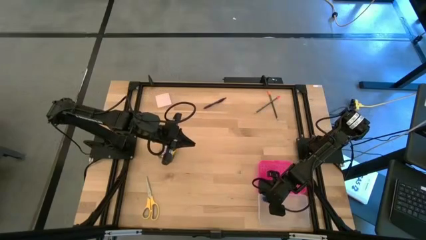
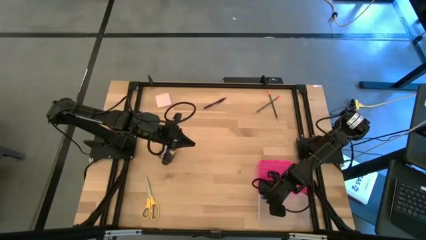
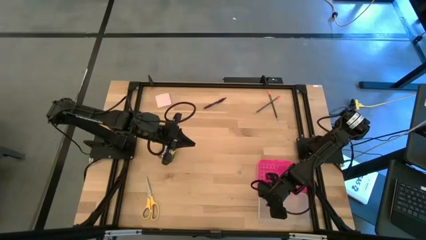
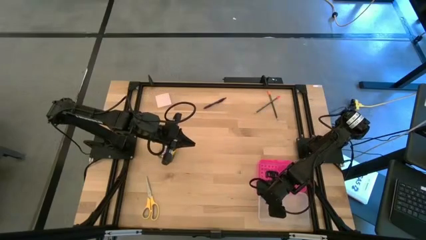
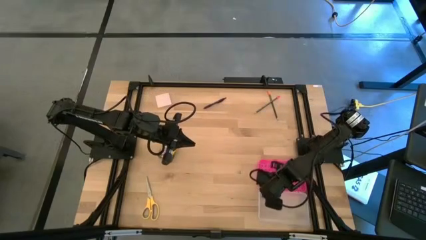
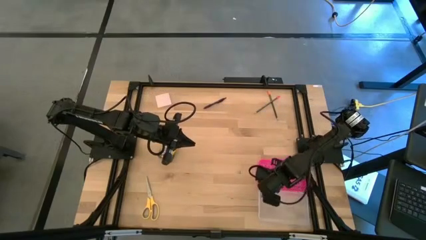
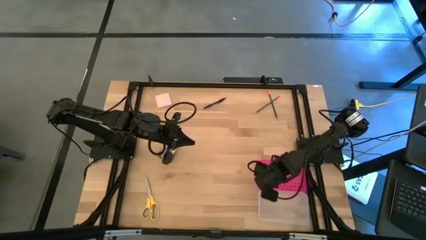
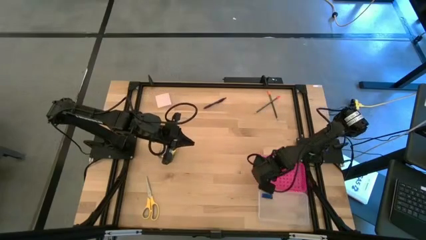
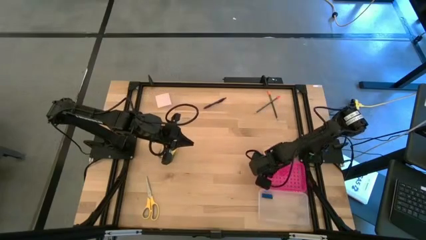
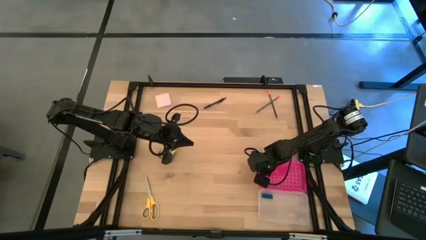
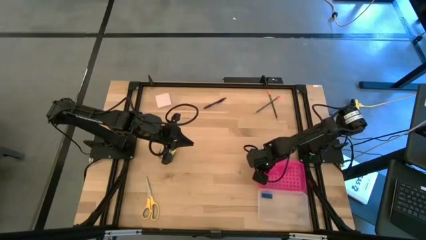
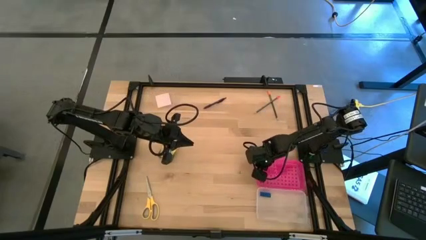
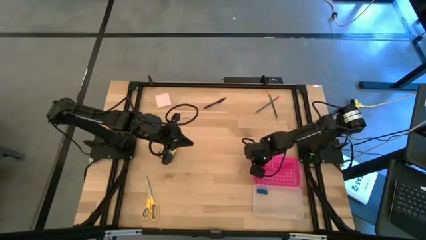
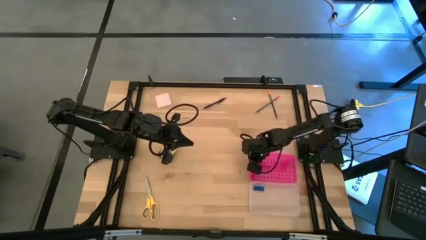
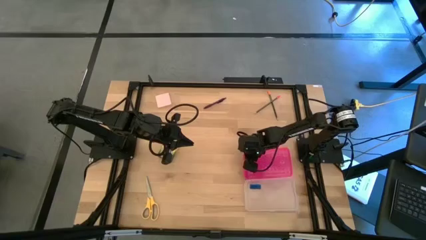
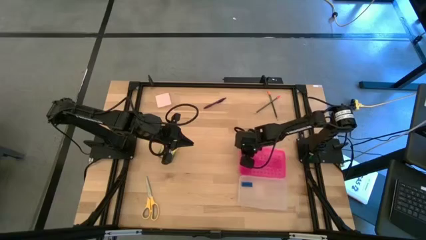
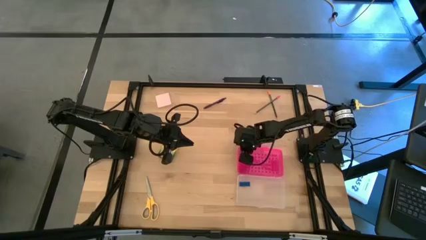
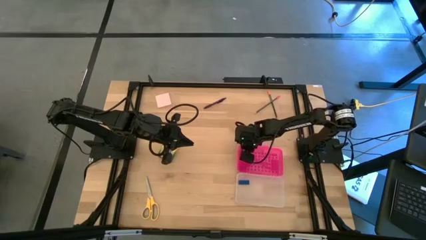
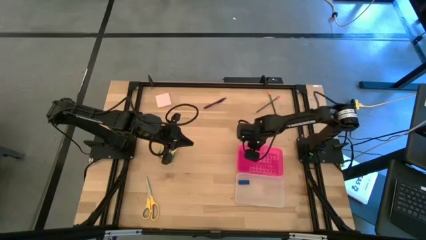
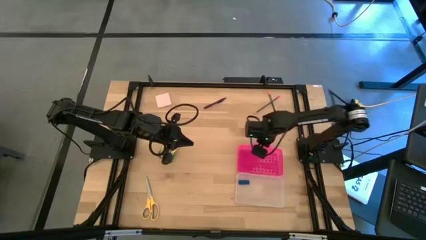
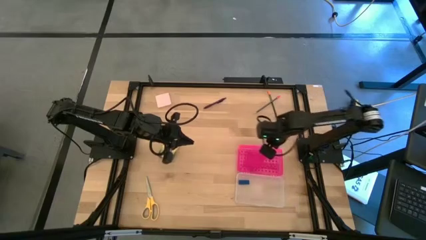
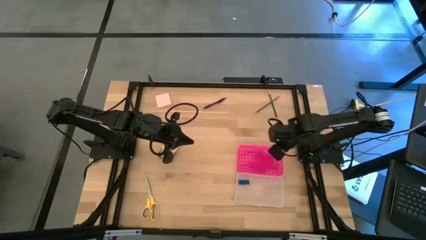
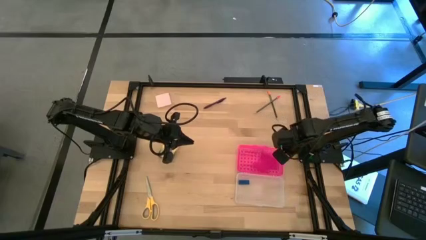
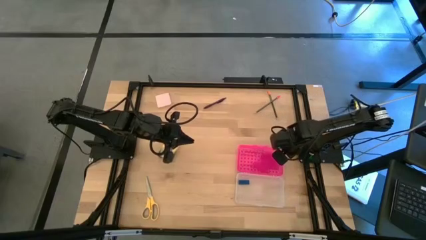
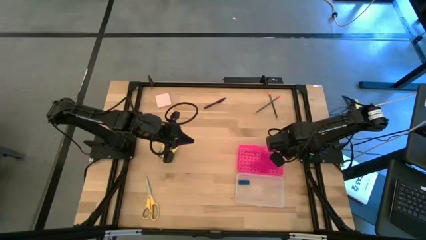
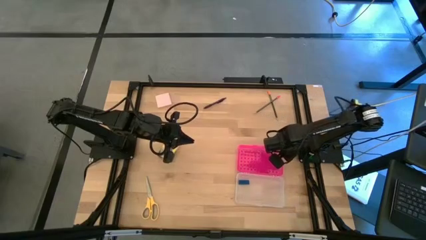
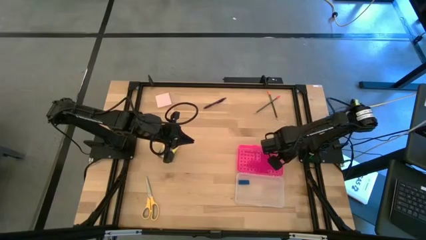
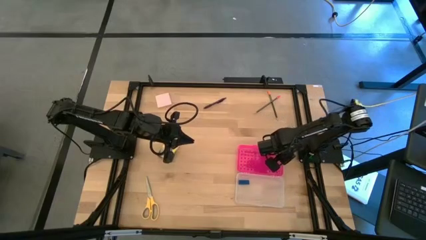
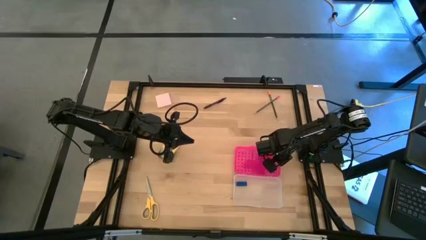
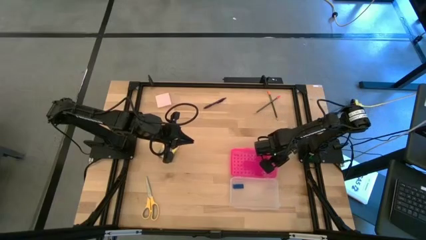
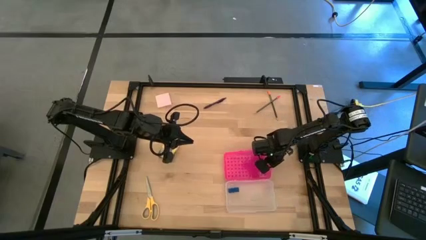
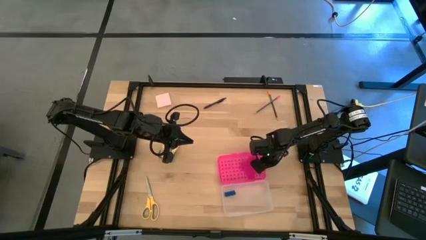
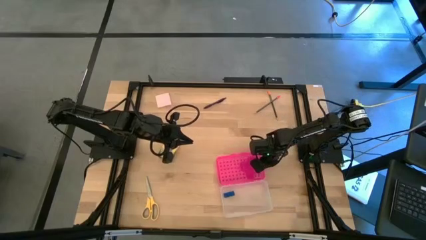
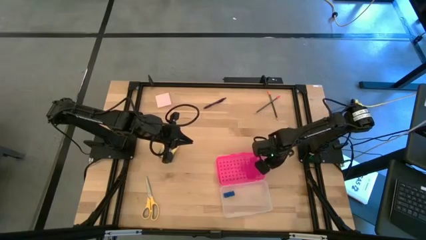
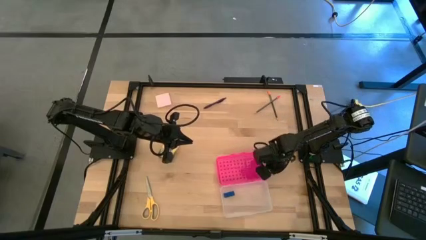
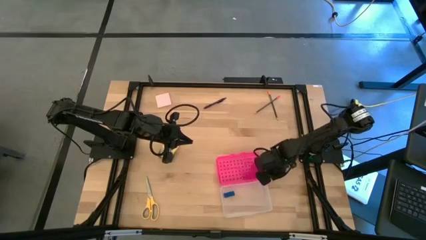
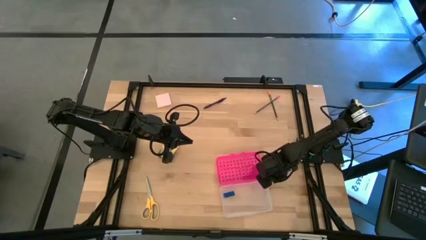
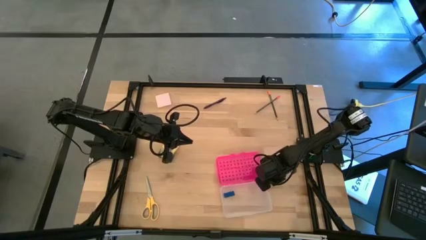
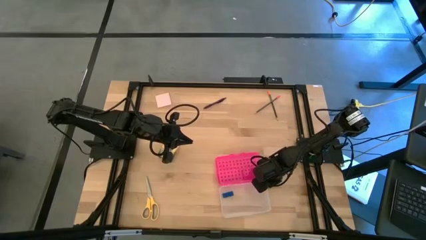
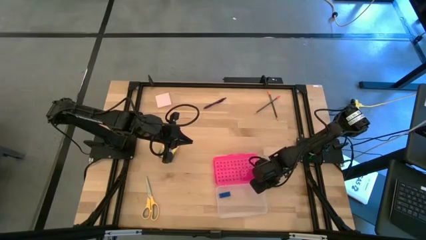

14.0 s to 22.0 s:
Task: Pack school essentials
Adjust the pink box

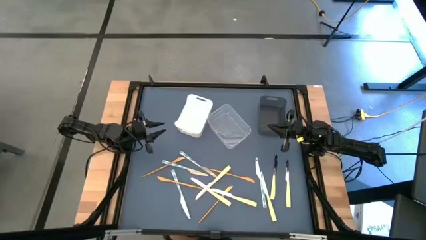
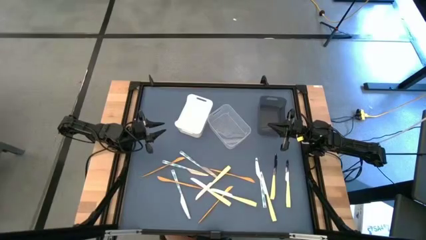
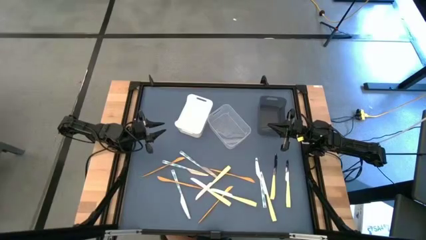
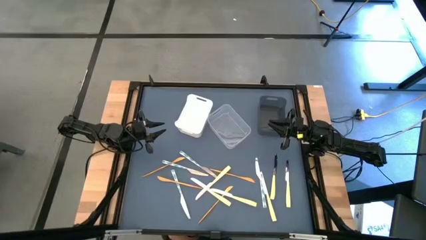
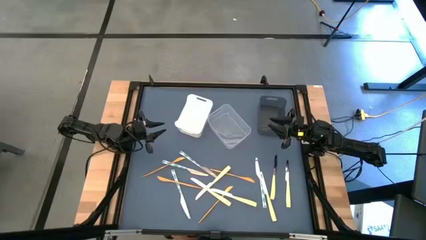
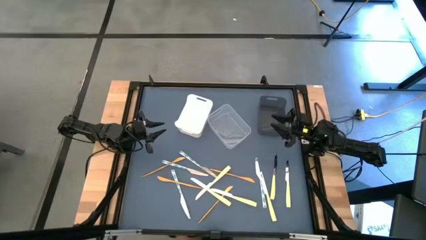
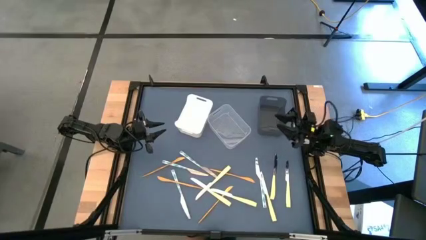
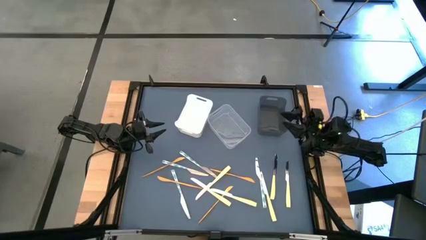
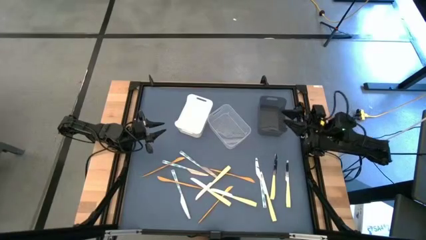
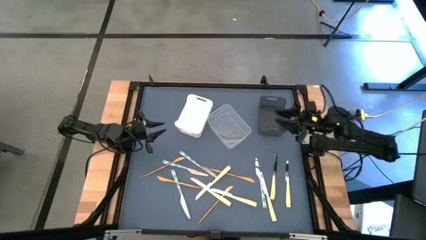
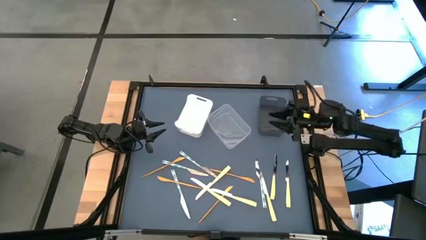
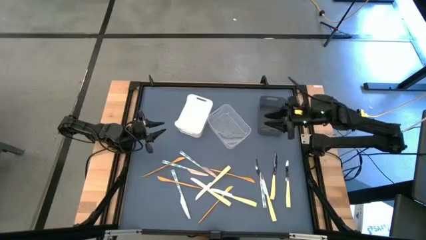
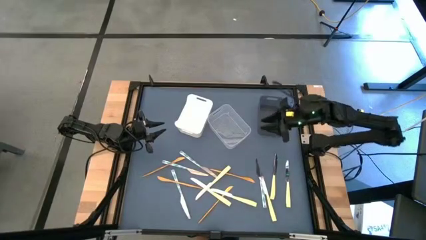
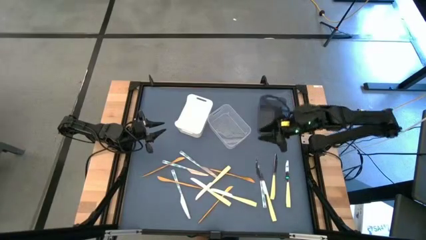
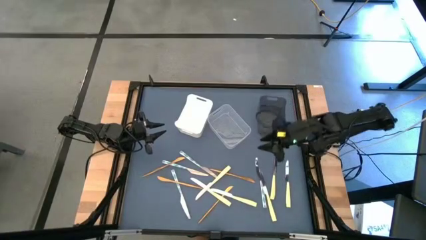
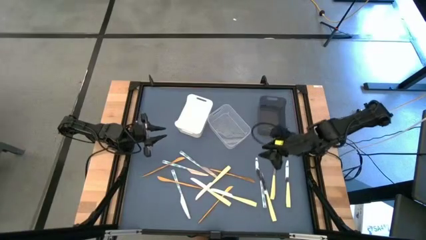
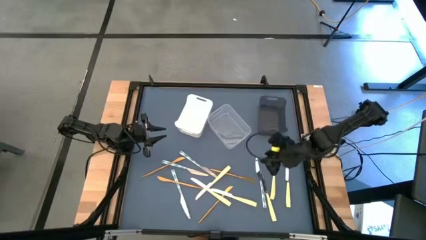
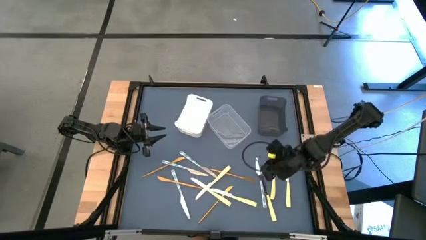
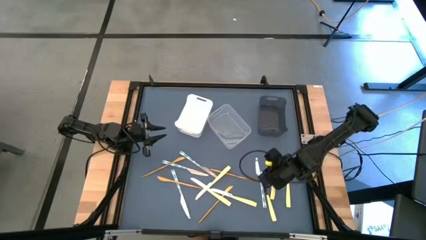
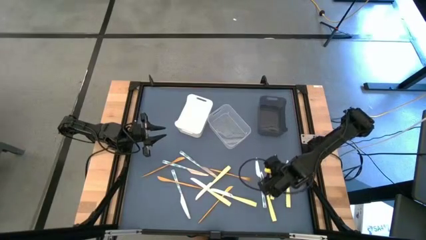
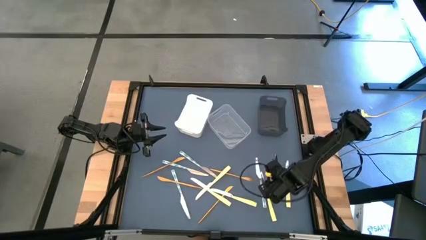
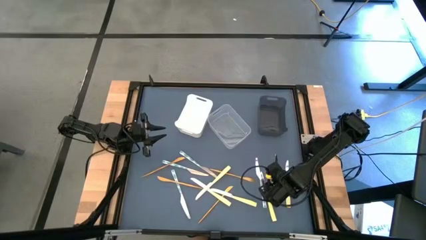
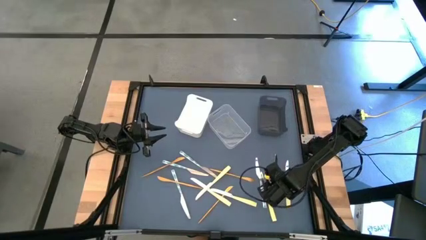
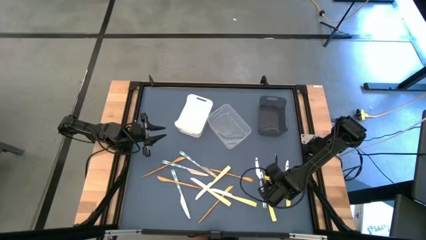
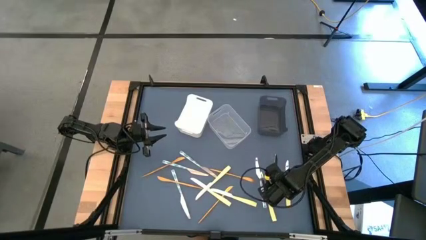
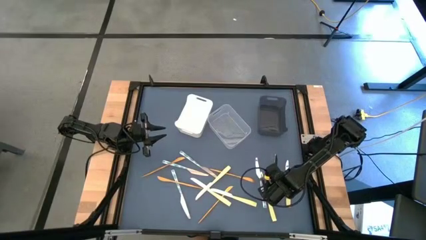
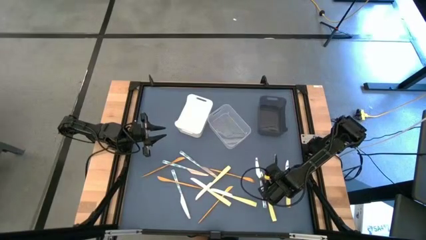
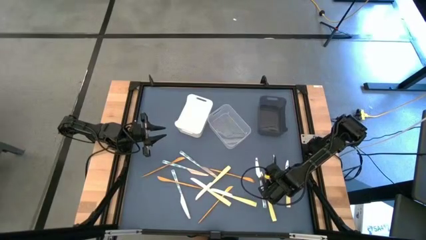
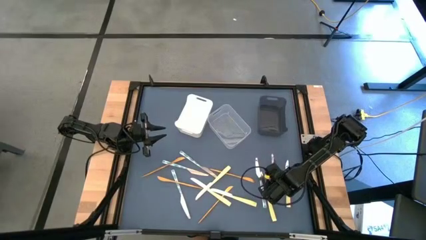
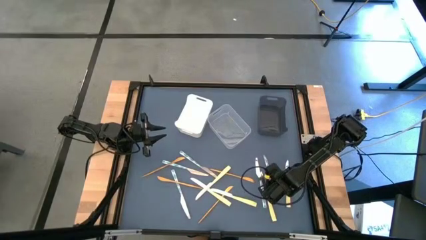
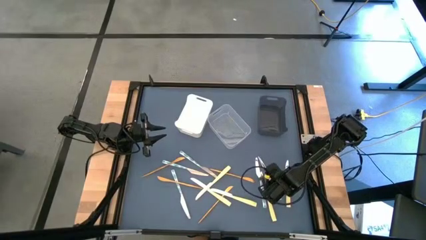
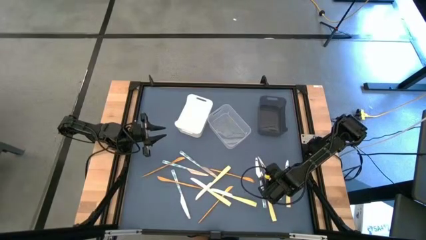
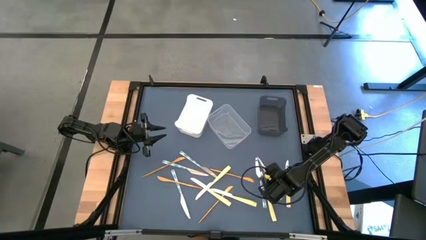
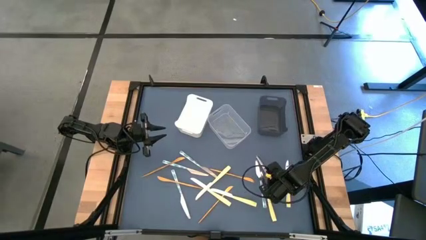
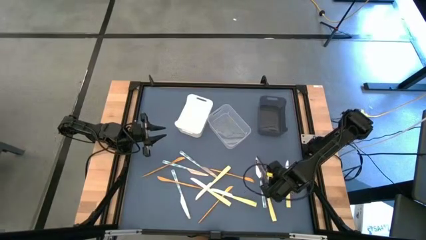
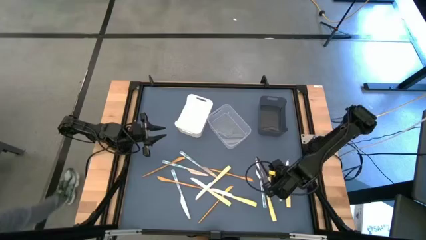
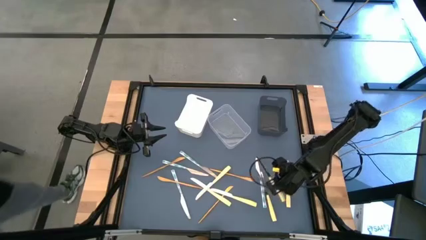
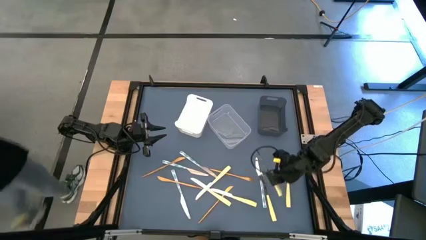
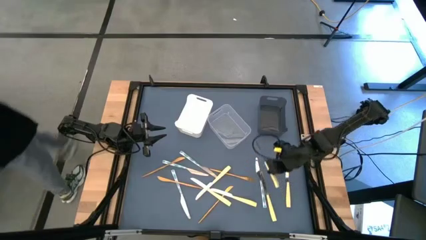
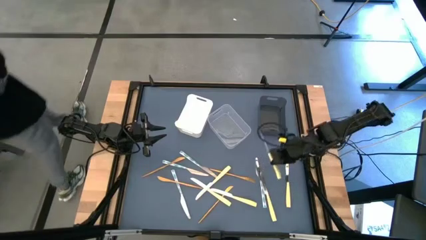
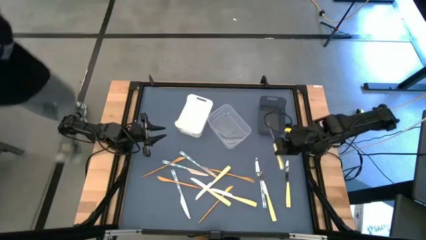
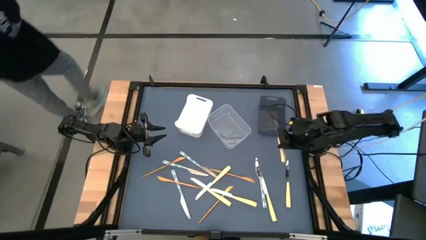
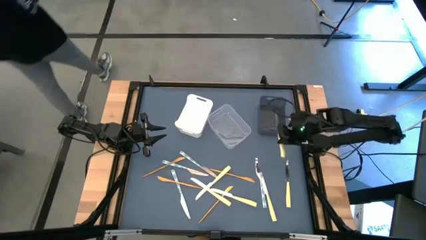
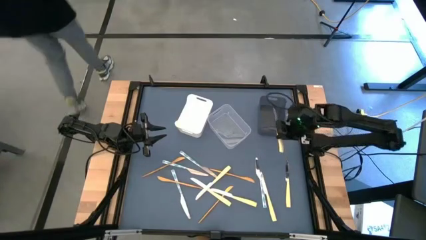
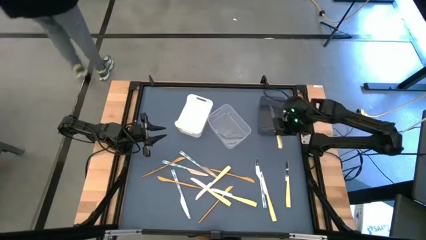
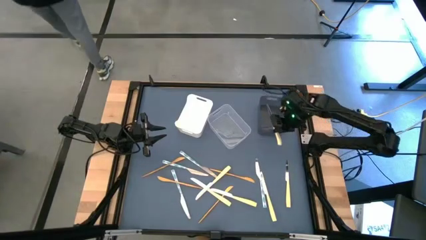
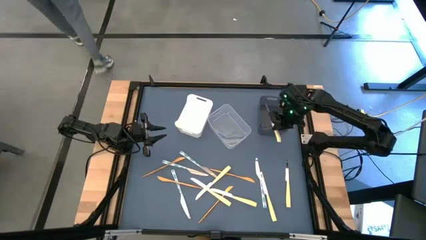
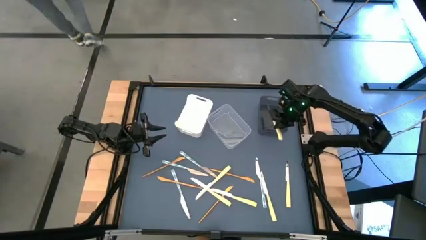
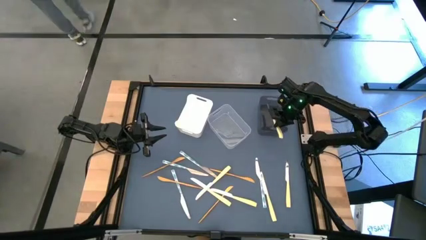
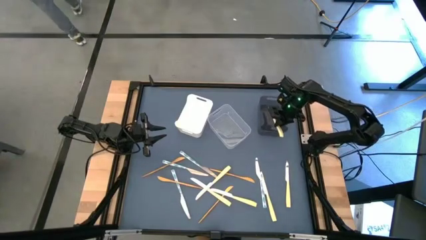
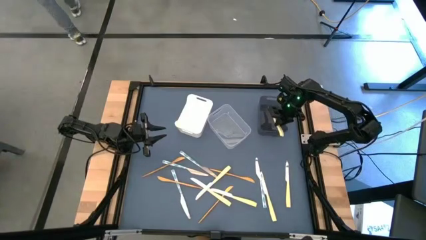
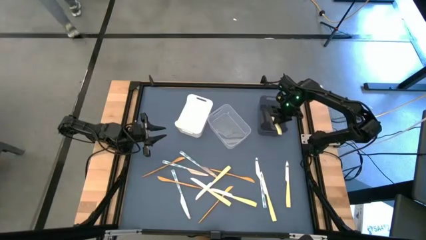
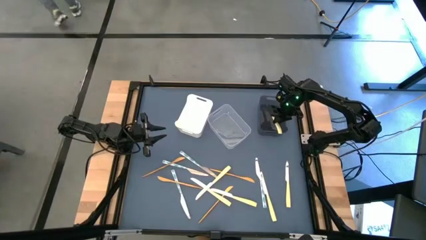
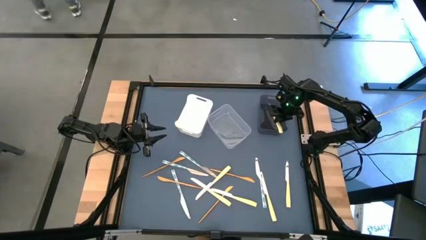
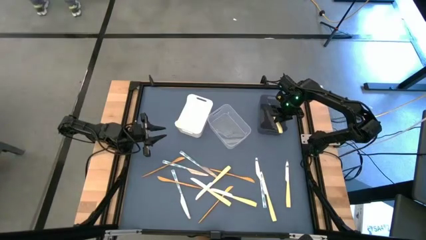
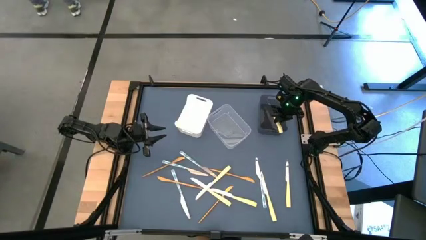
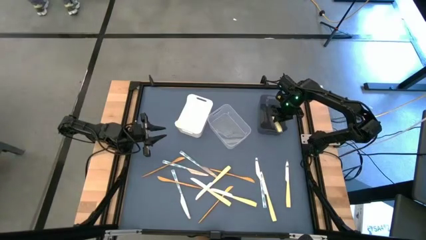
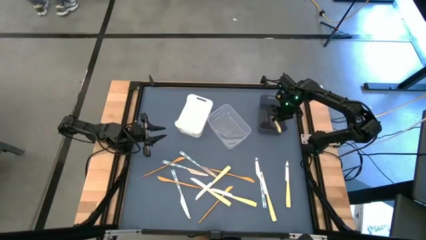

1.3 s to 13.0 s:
Task: Sort silverware by color (type)
Put the yellow knife into the black bin
